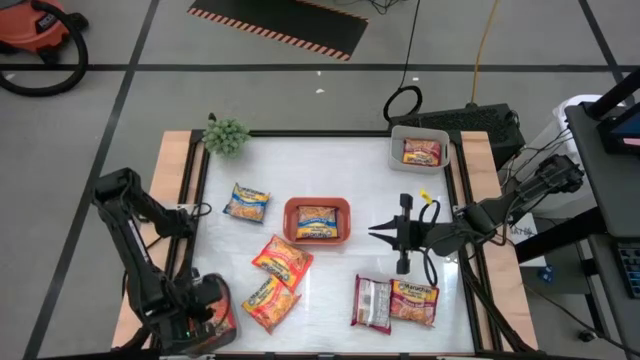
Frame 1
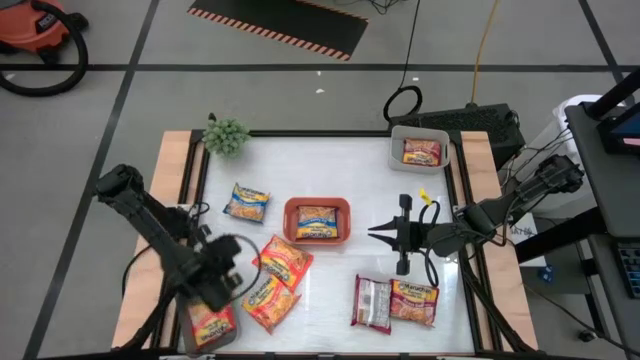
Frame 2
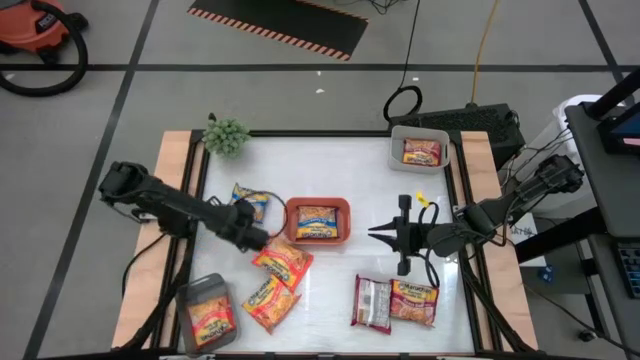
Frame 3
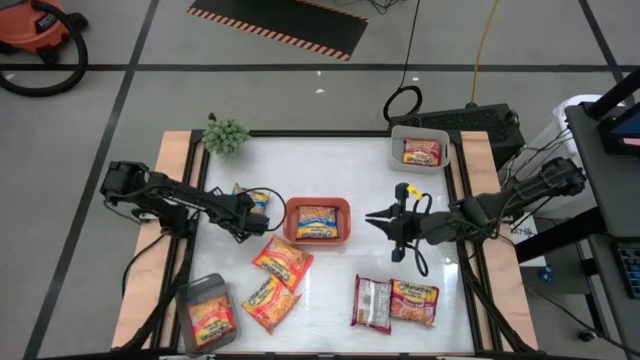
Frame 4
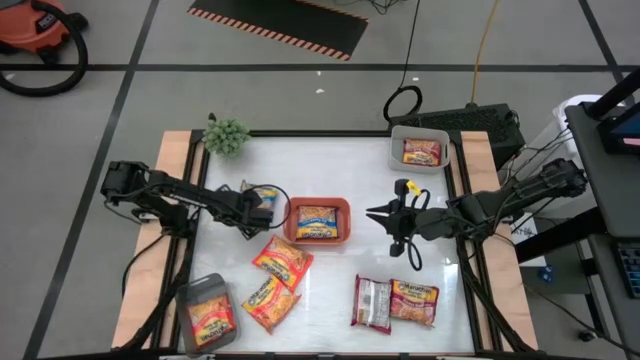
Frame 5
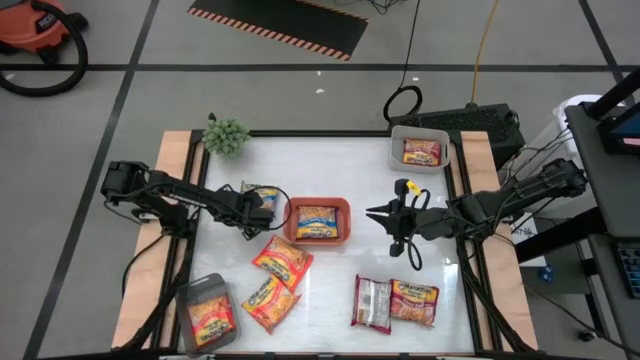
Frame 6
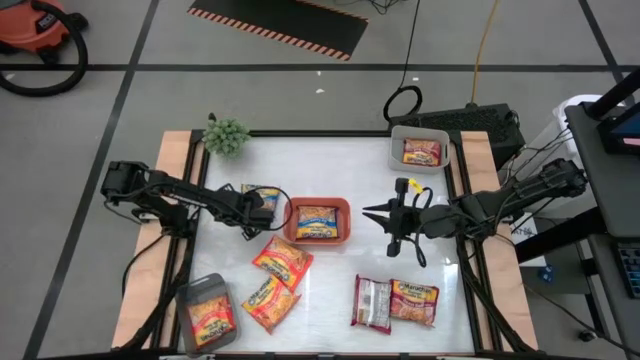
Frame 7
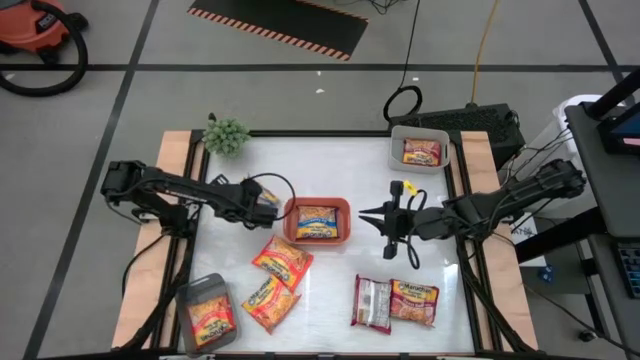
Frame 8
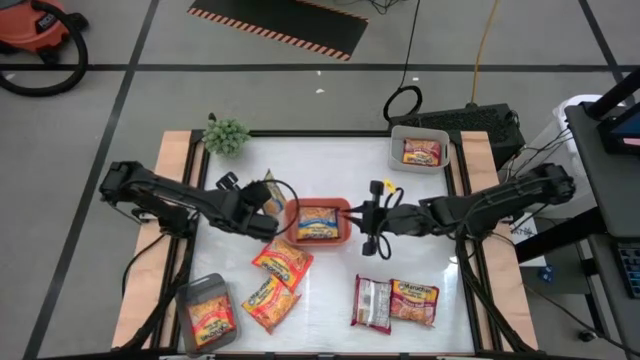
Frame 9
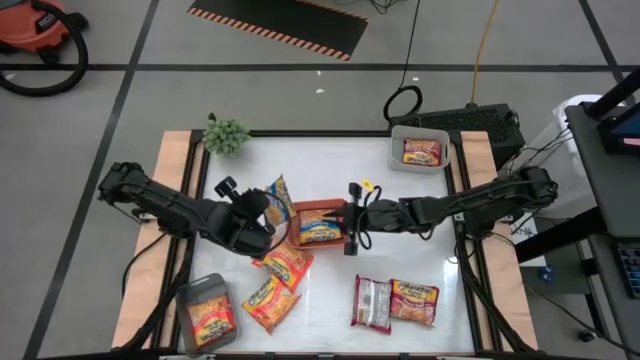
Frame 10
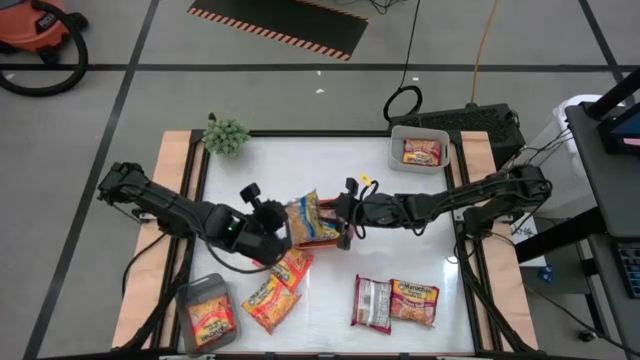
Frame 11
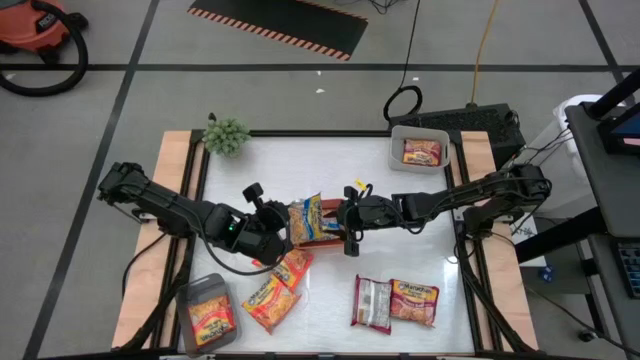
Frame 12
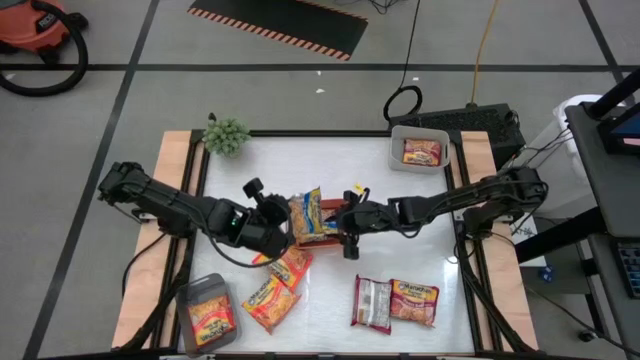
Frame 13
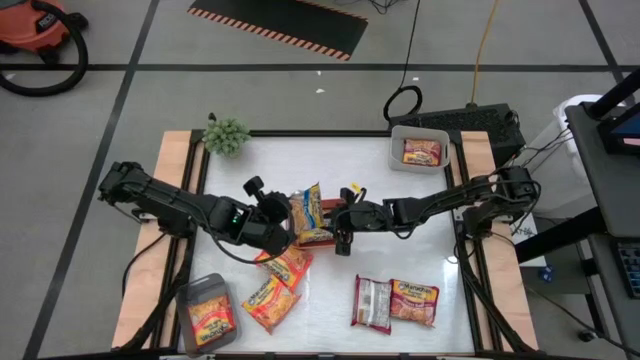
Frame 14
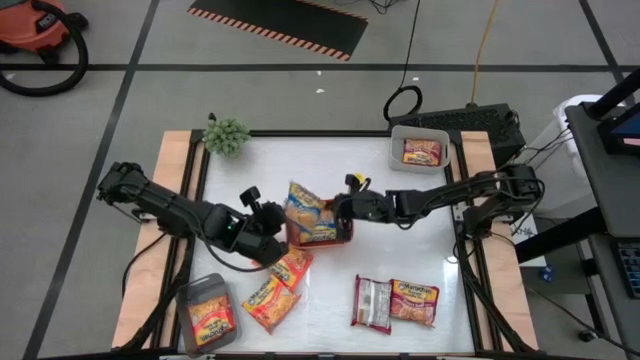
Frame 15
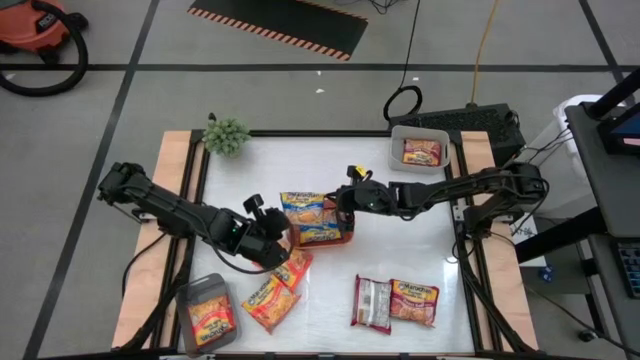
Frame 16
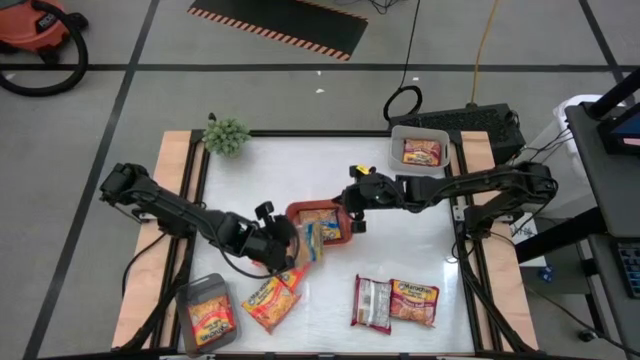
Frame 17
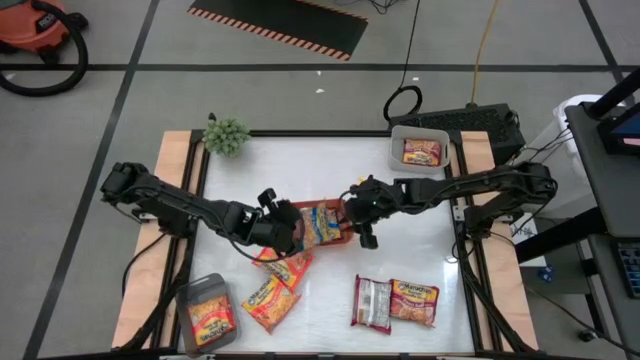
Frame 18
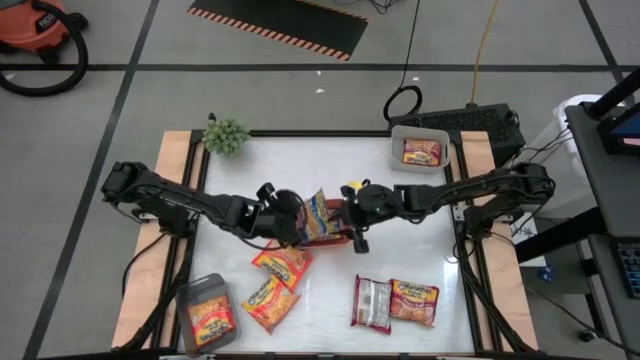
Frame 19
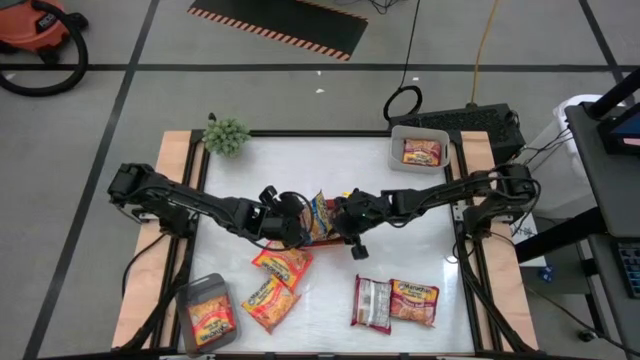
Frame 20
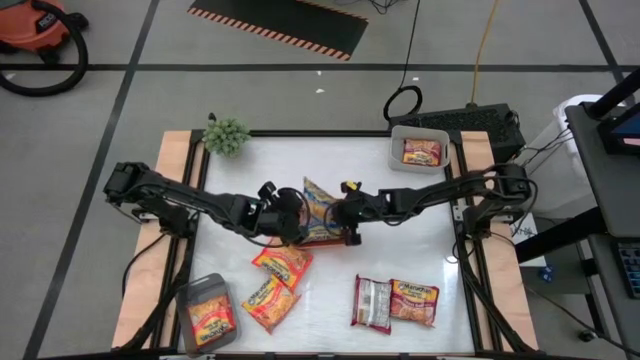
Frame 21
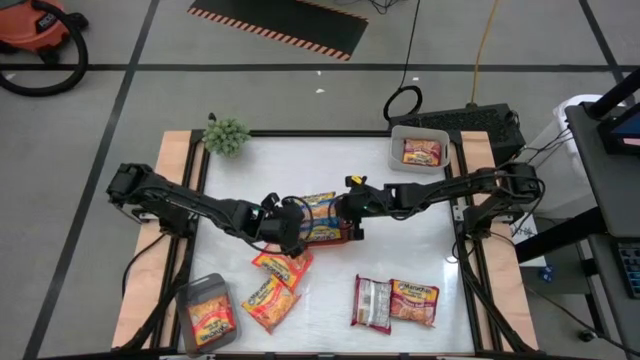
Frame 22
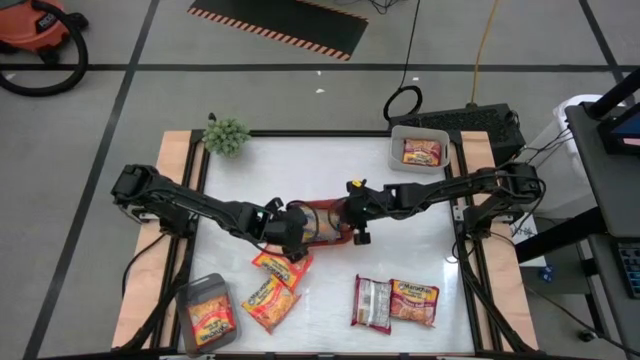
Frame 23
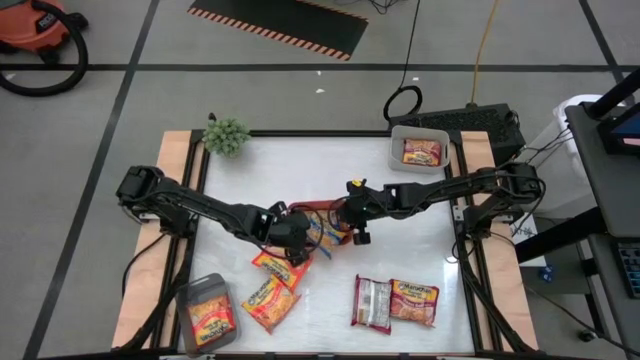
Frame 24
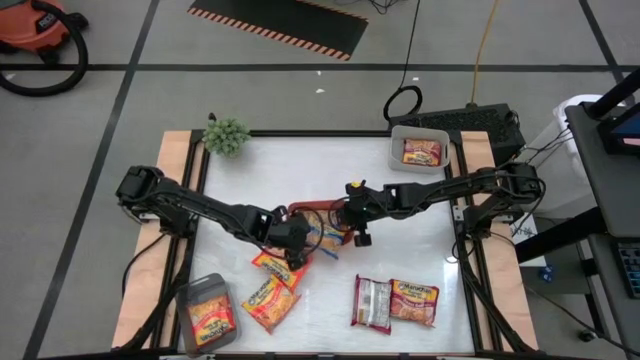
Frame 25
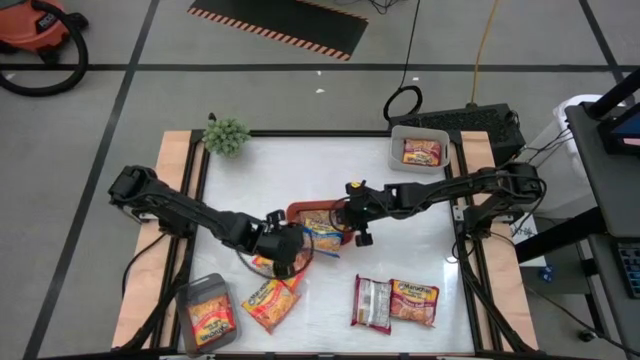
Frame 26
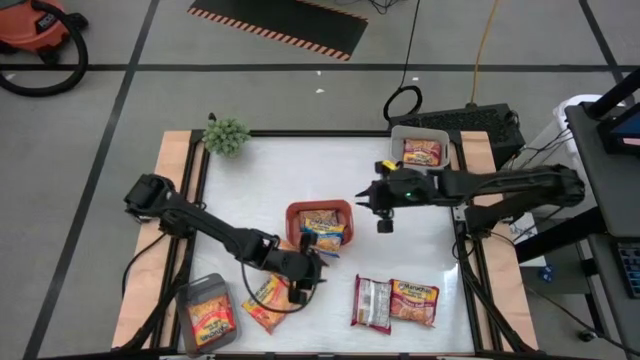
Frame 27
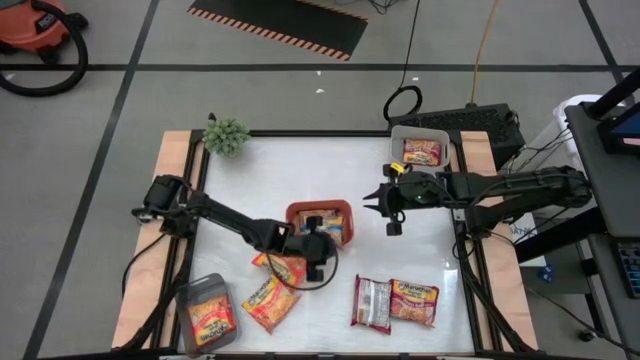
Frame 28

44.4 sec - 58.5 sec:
Task: Sort Maruchan noodles
Put the blue noodle pack into the orange bin

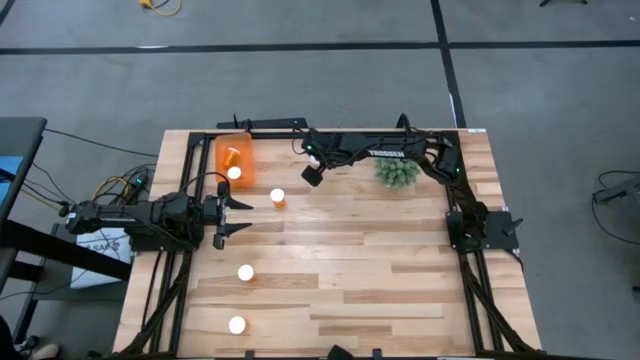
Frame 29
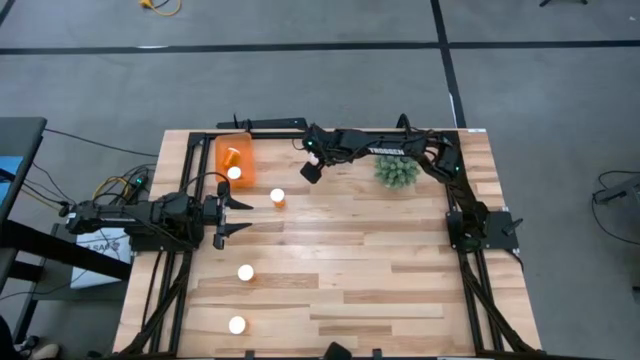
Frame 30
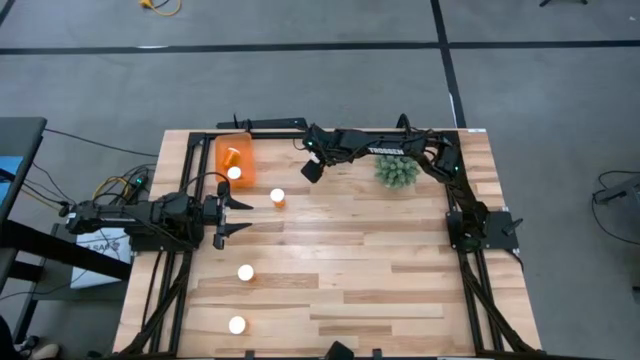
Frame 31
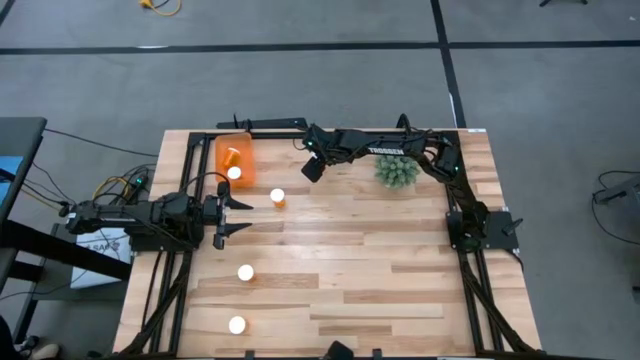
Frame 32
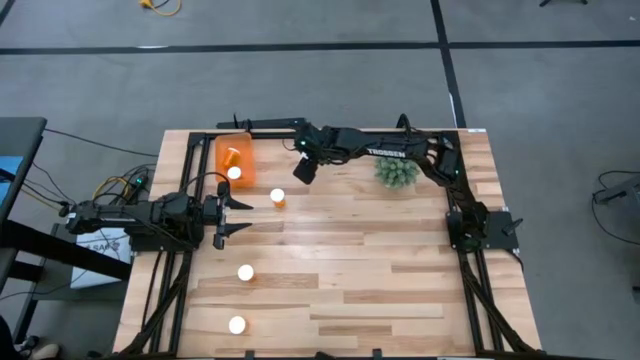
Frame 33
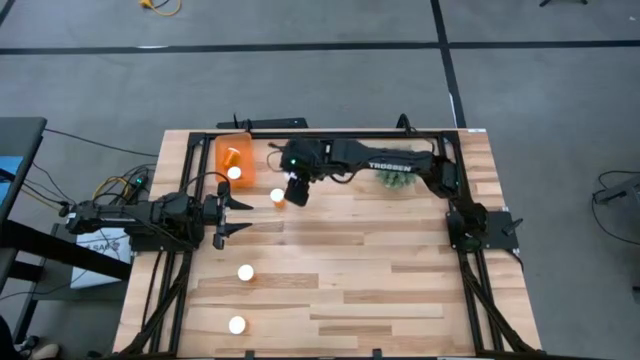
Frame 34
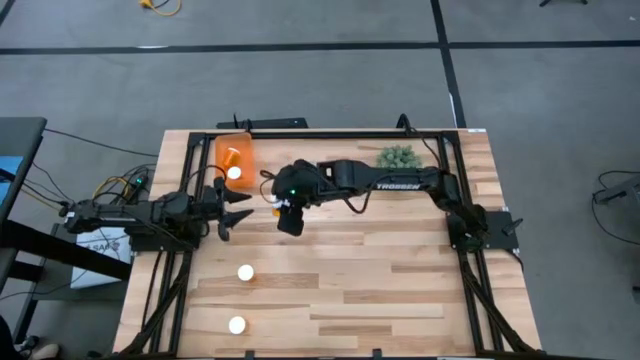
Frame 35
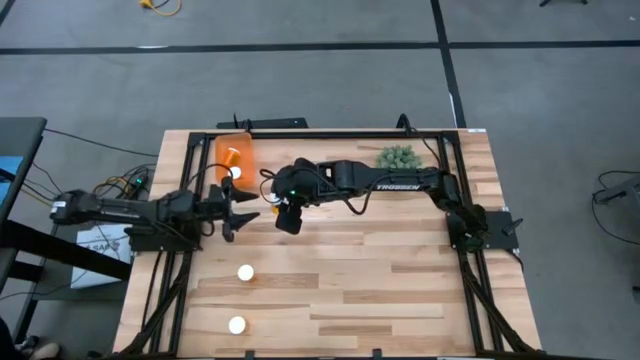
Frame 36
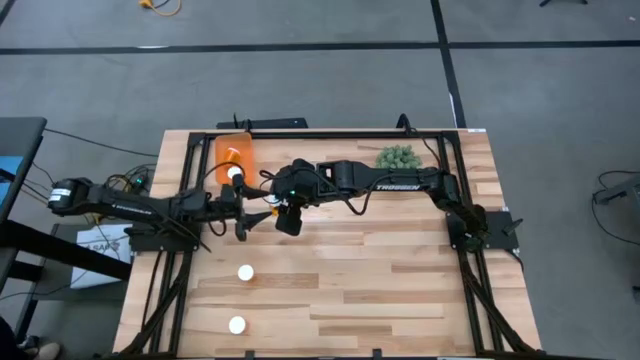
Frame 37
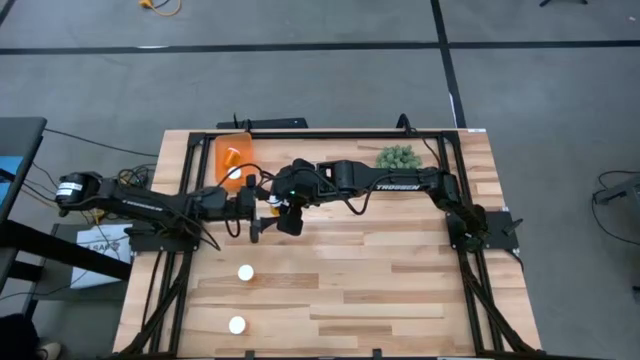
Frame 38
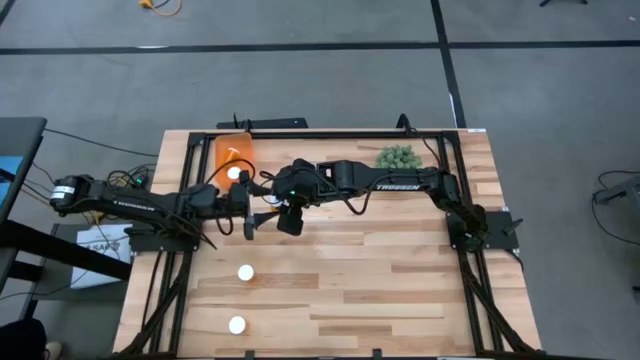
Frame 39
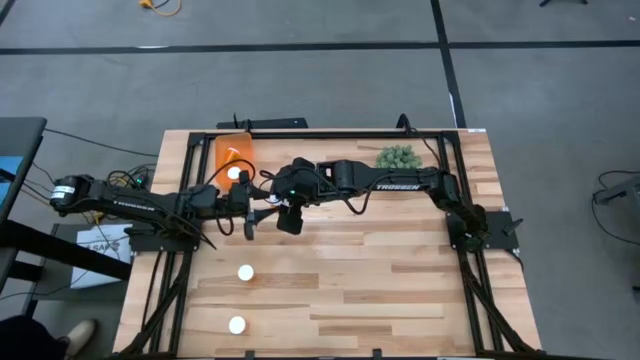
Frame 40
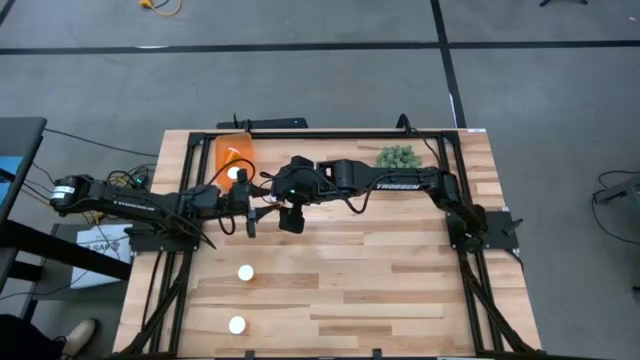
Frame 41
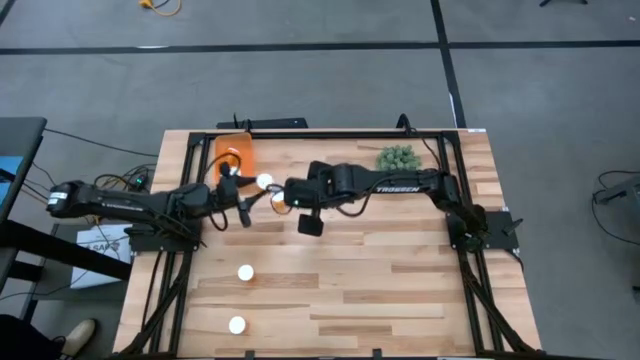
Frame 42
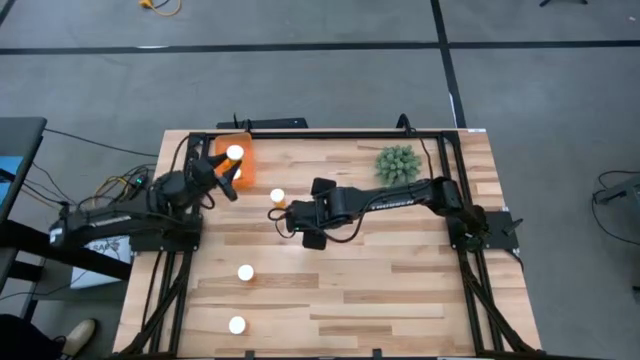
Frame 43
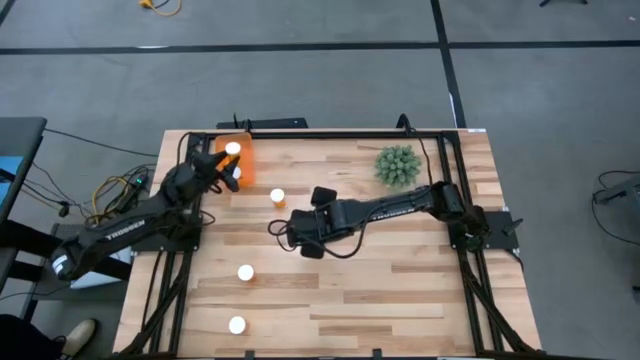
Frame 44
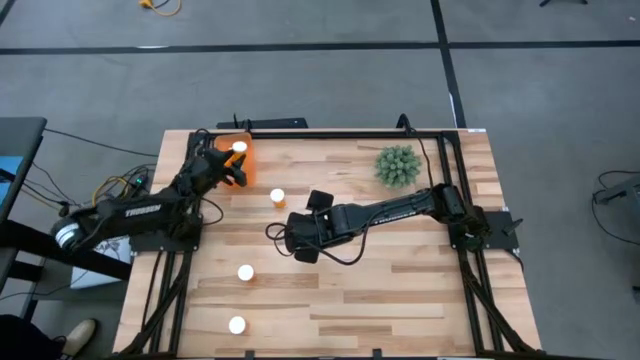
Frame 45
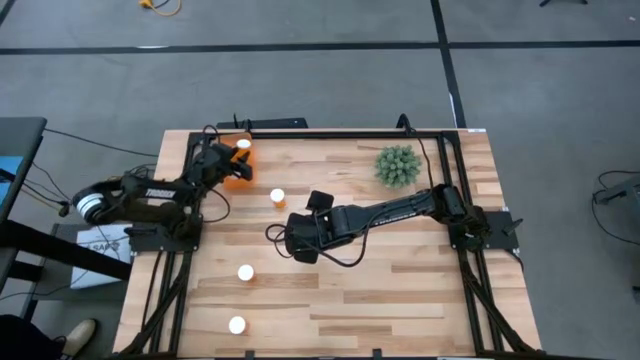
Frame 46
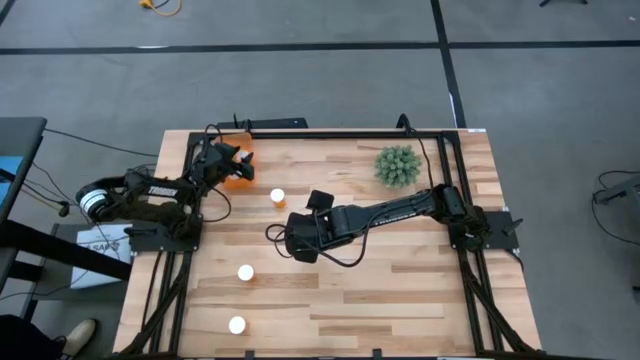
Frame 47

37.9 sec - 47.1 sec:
Task: Pick and place pill bottles into a basket
Put the orange pill bottle into the orange container
